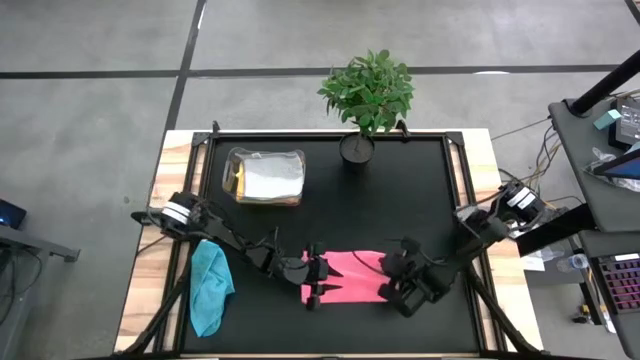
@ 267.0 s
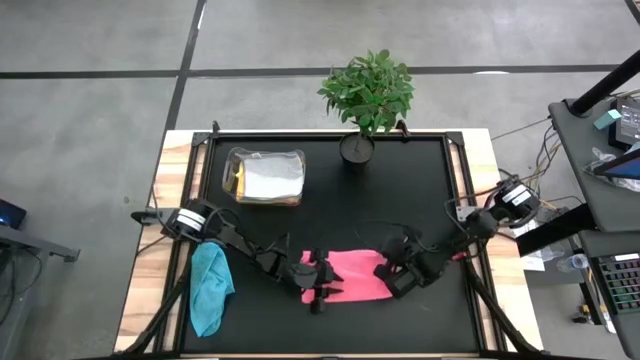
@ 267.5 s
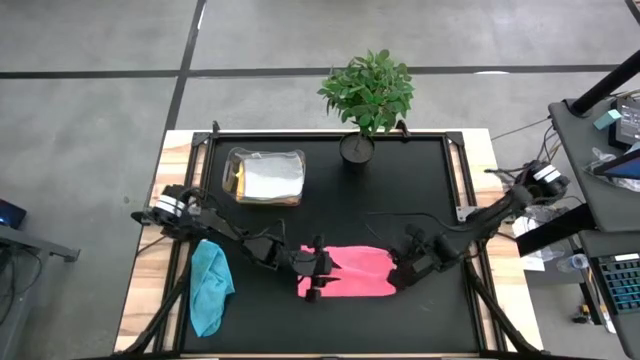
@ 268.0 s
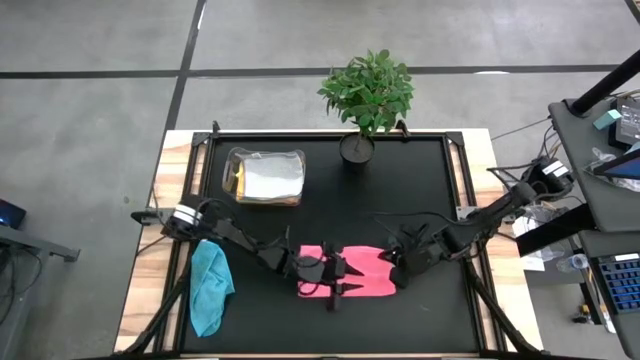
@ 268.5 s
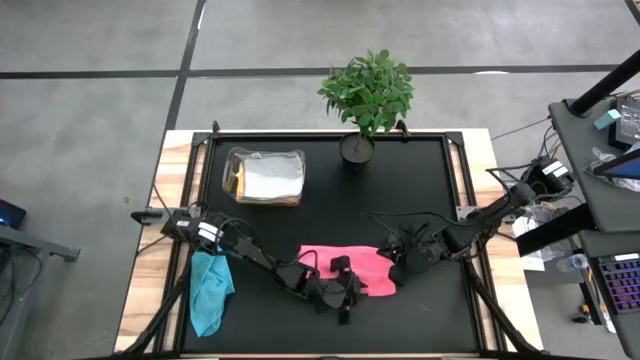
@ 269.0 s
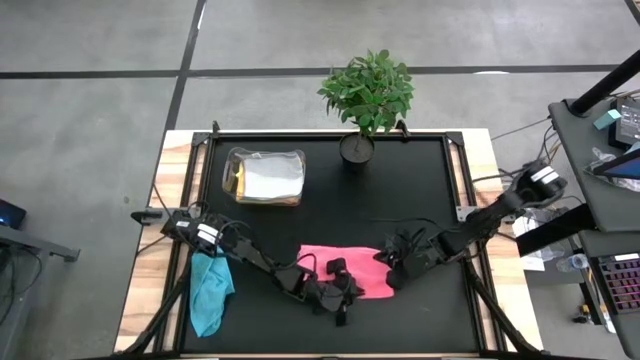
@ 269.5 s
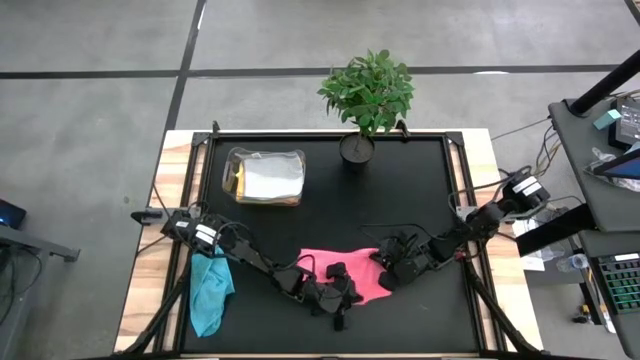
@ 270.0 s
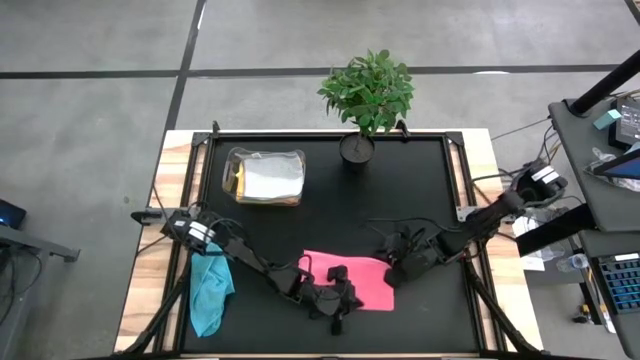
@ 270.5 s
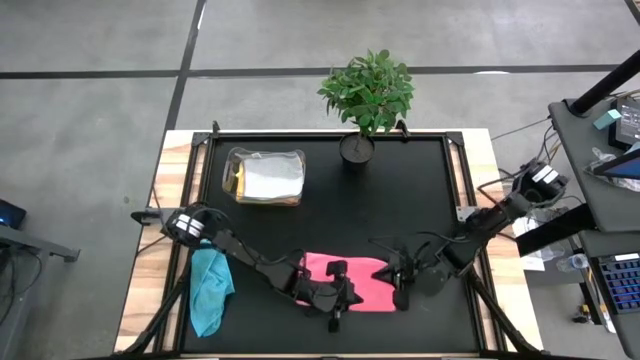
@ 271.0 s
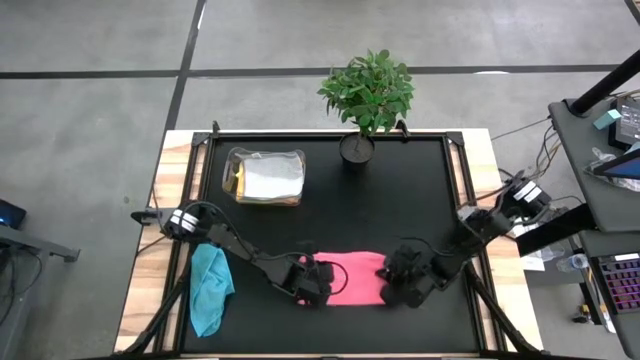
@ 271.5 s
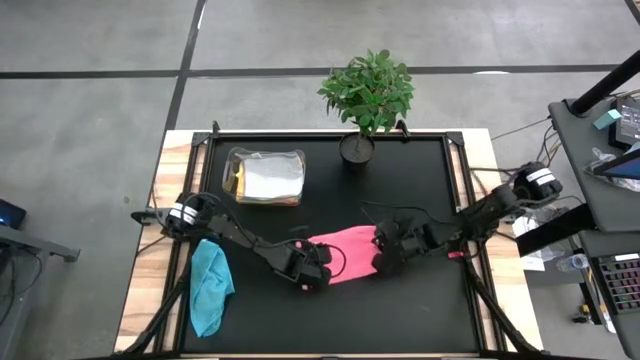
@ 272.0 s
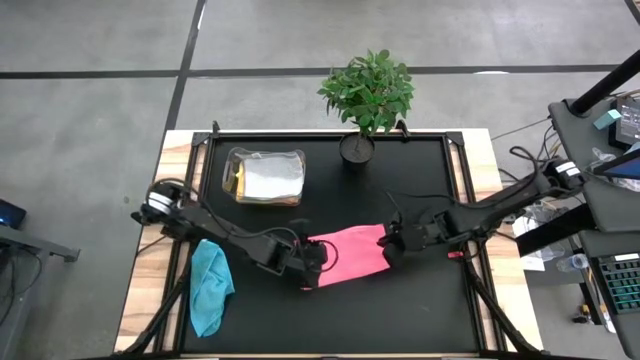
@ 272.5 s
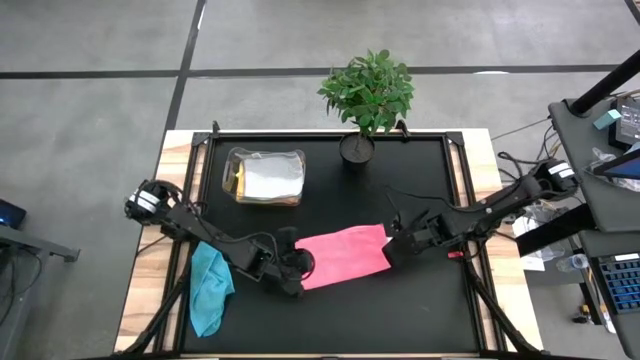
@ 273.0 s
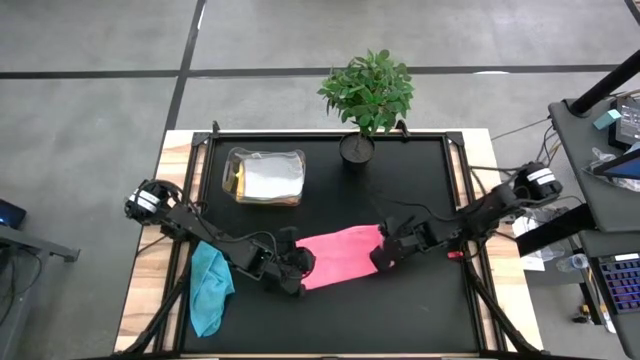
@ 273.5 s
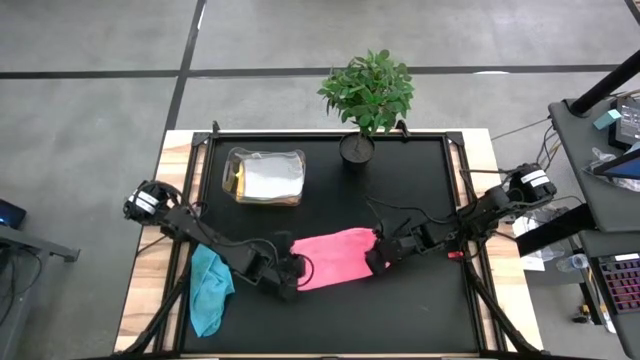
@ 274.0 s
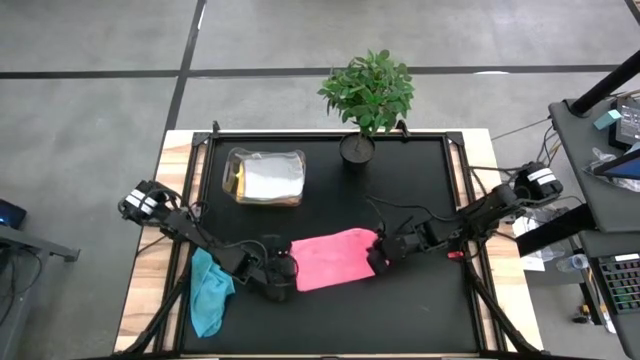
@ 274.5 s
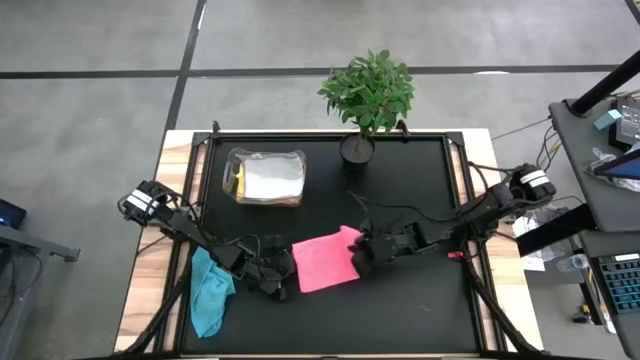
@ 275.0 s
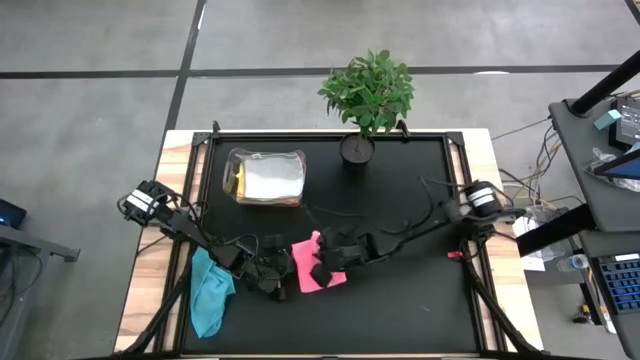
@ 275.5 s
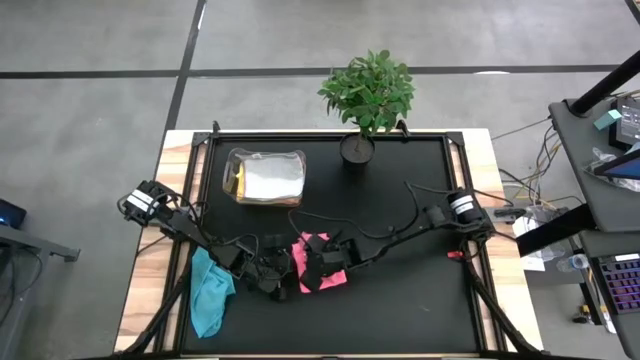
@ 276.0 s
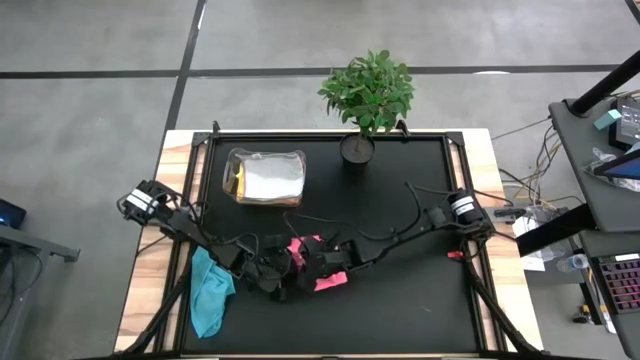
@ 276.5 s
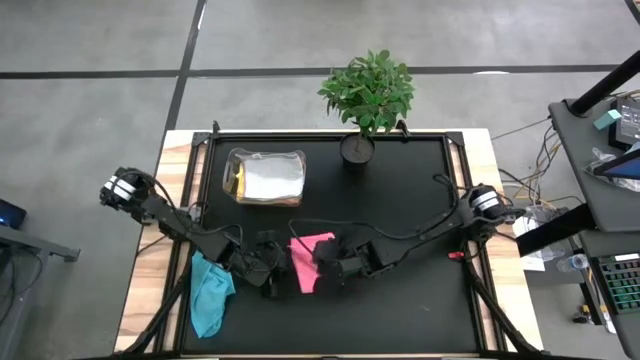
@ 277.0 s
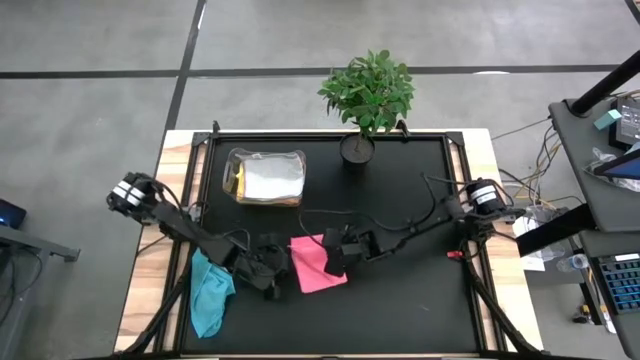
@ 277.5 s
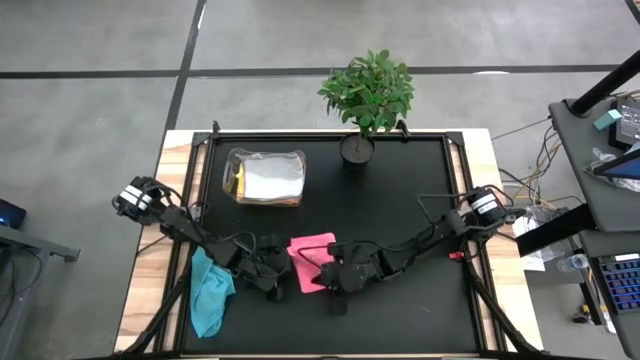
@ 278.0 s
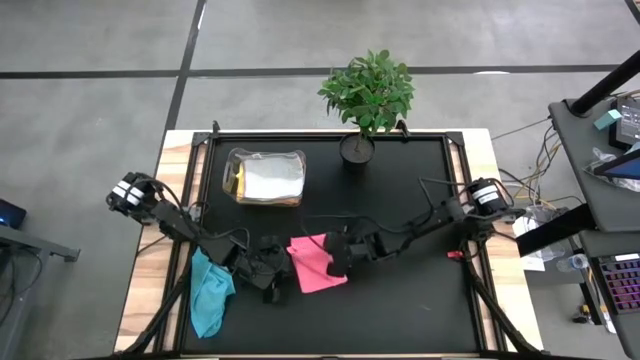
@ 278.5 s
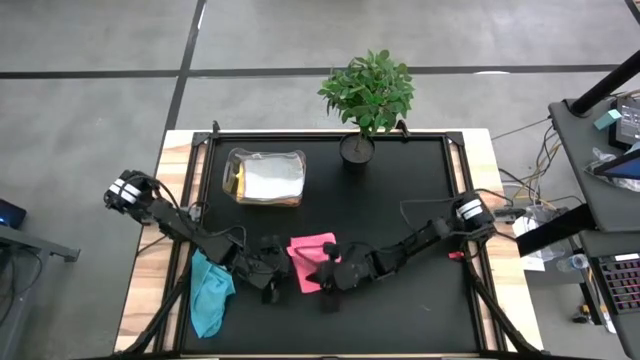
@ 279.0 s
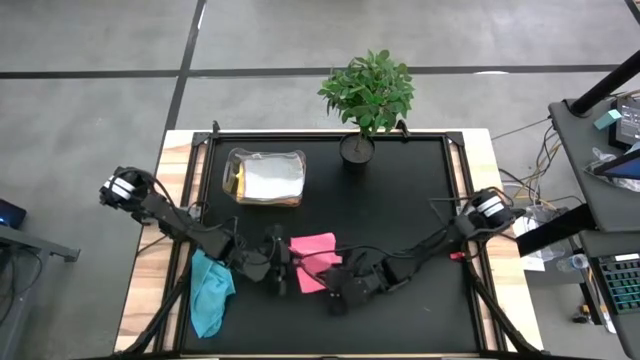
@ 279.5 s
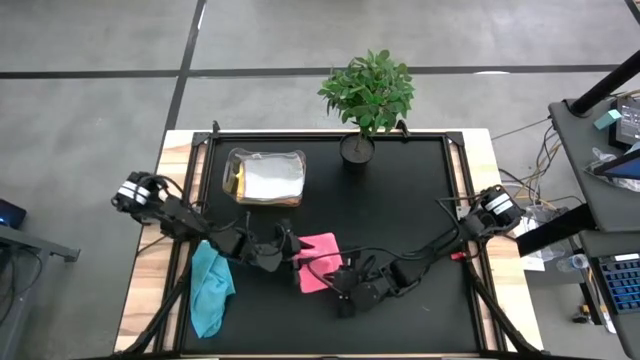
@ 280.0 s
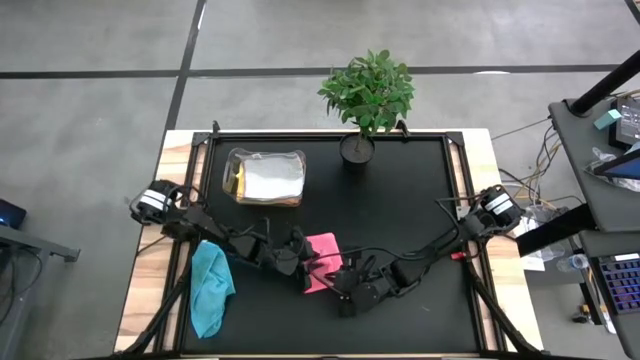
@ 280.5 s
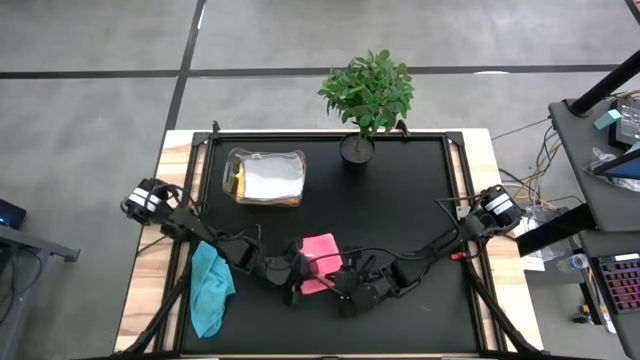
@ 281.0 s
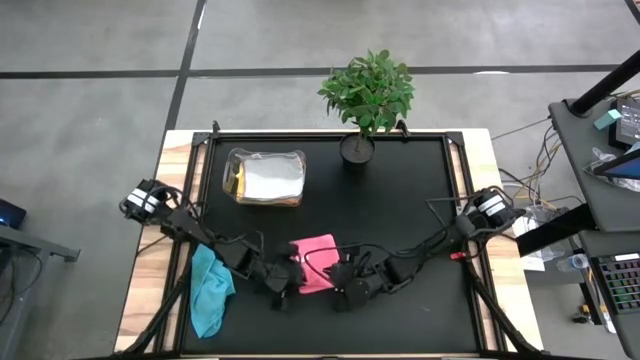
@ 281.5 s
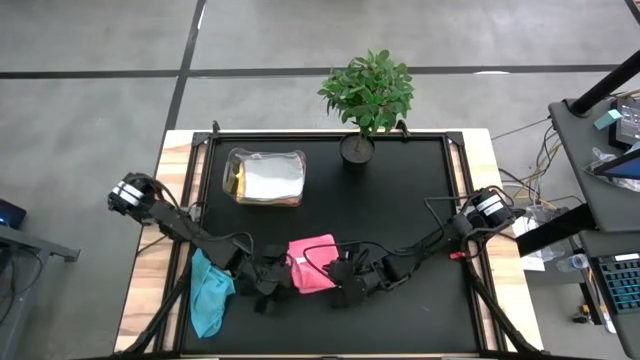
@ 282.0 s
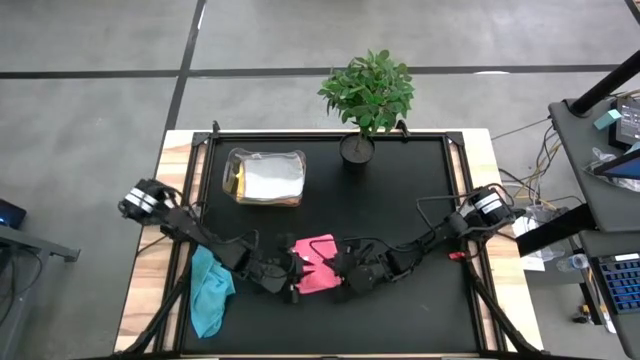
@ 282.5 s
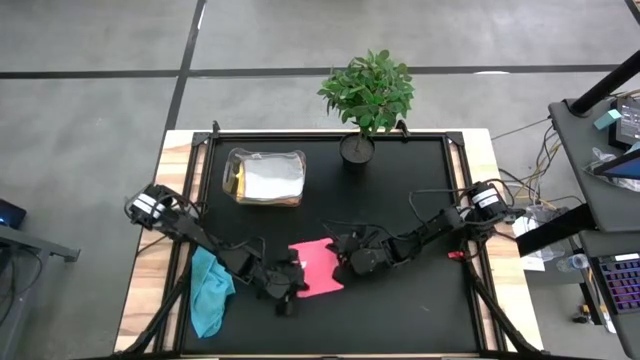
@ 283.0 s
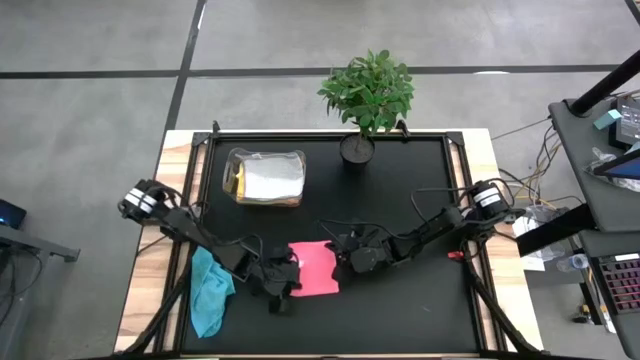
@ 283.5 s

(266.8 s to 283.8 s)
Task: Fold microfiber towels
Fold the pink towel

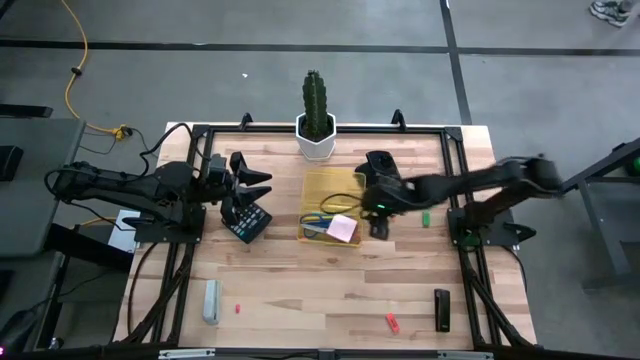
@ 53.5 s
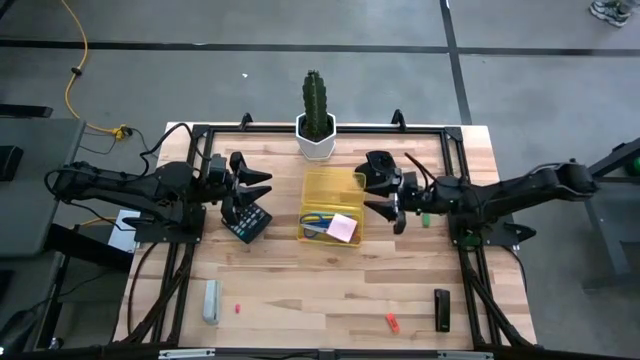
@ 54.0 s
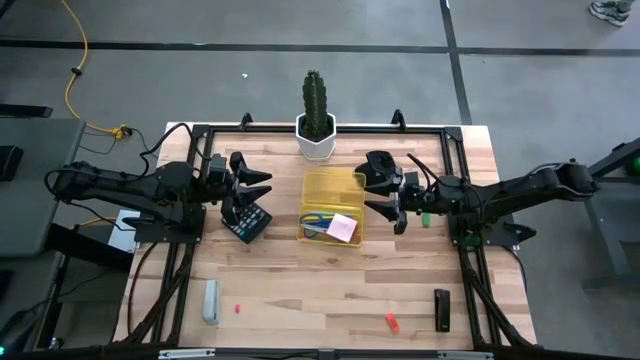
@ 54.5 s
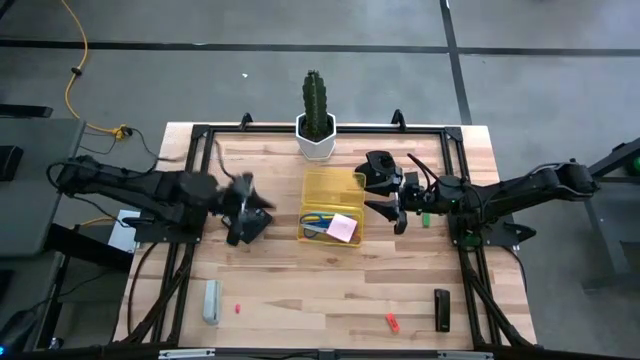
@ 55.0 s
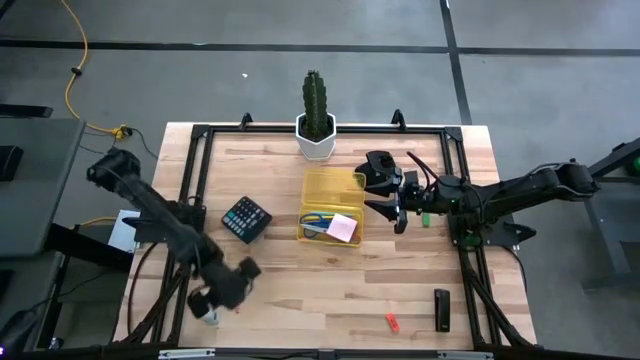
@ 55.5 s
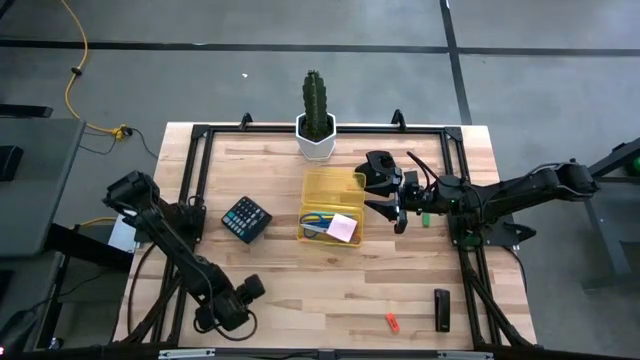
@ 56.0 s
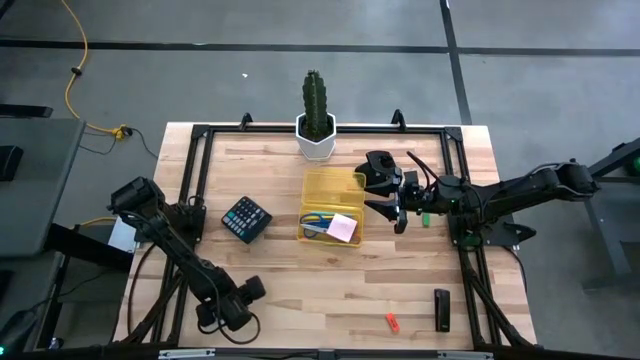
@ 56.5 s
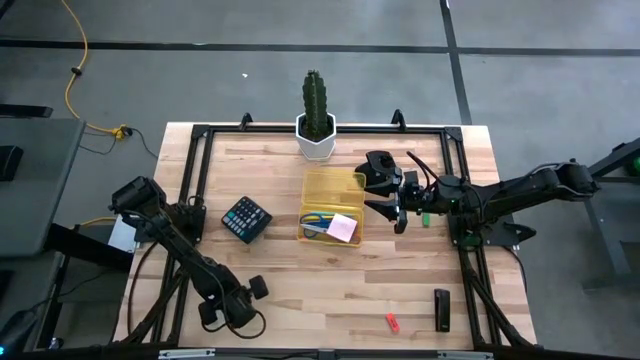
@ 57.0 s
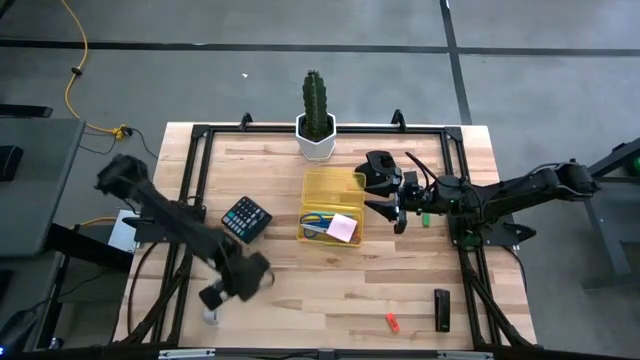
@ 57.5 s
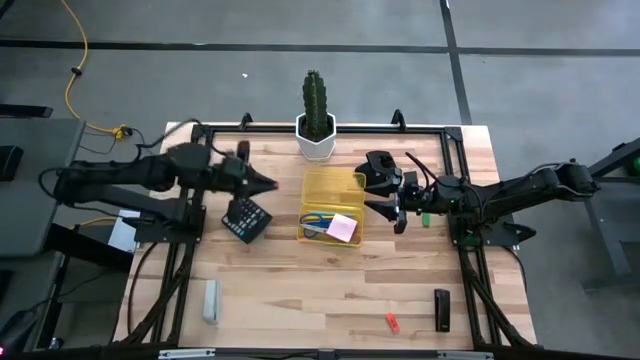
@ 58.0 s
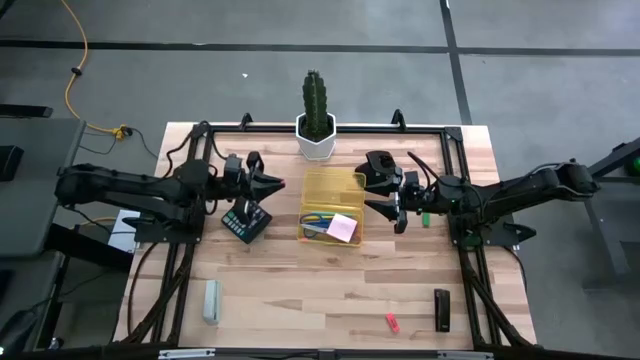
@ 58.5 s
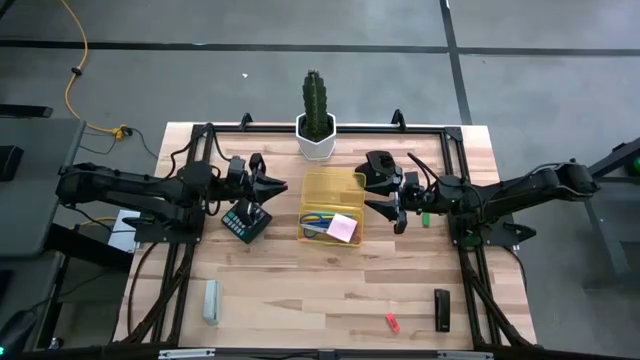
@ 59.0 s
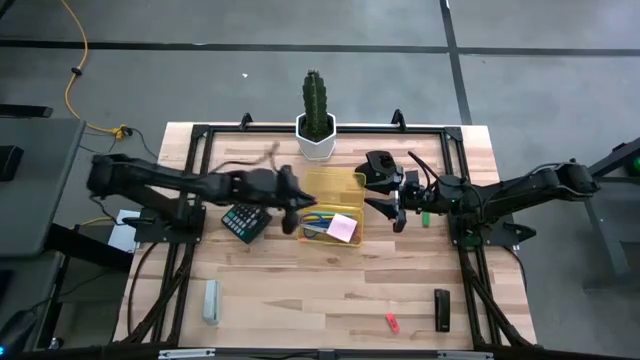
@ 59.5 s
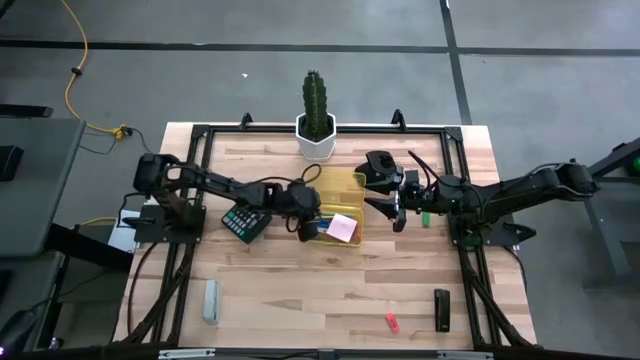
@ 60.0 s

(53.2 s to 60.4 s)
Task: Pack school essentials
Put the pink pencil top eraser into the supply box
